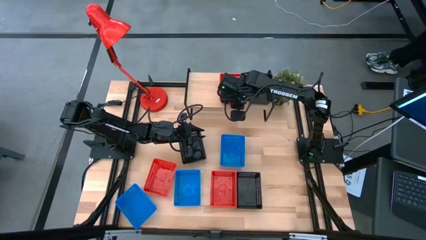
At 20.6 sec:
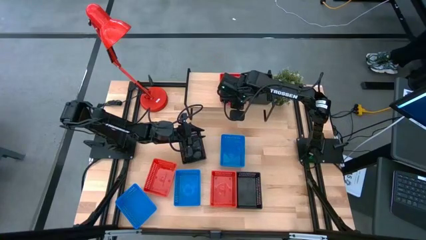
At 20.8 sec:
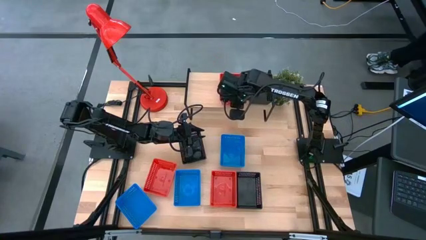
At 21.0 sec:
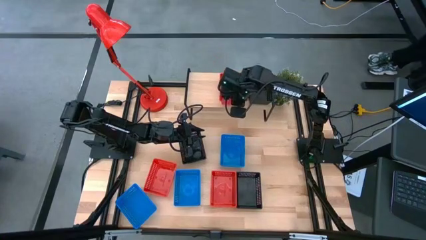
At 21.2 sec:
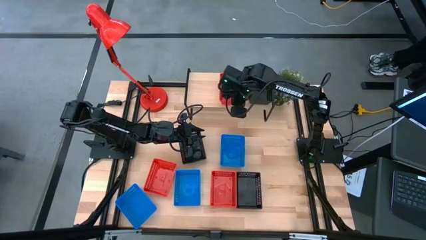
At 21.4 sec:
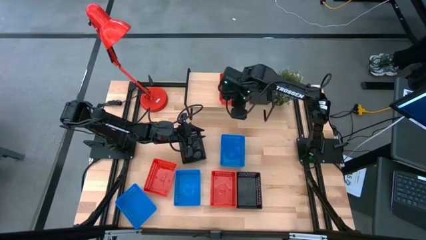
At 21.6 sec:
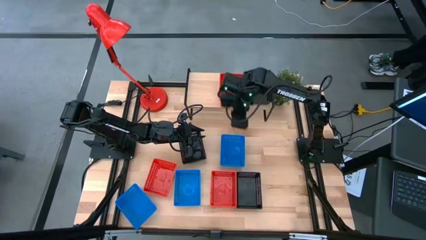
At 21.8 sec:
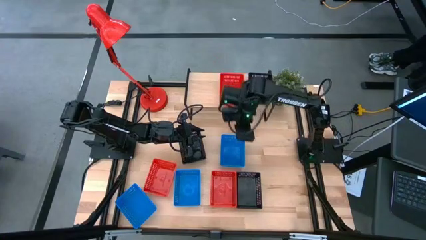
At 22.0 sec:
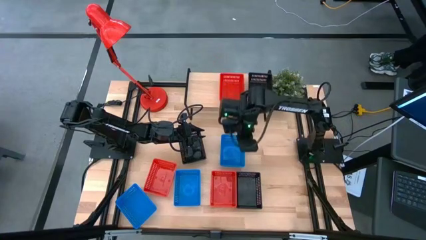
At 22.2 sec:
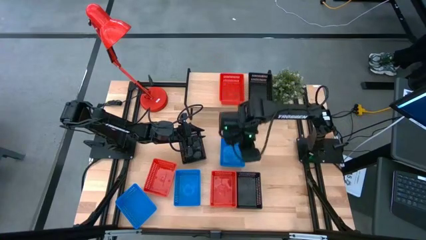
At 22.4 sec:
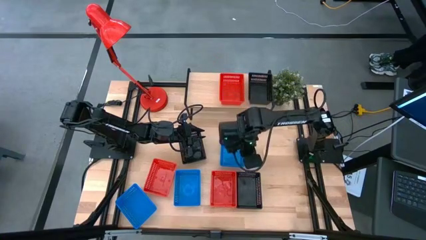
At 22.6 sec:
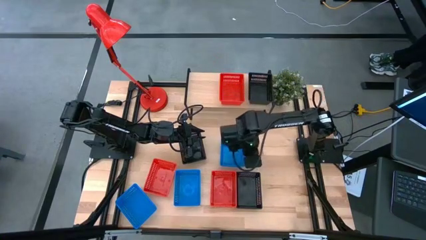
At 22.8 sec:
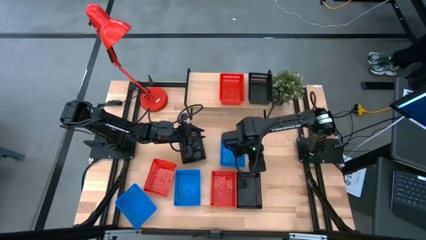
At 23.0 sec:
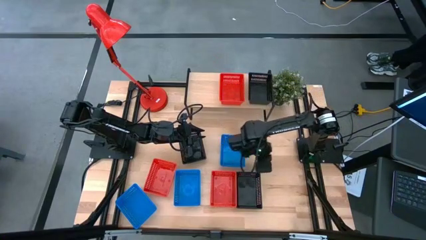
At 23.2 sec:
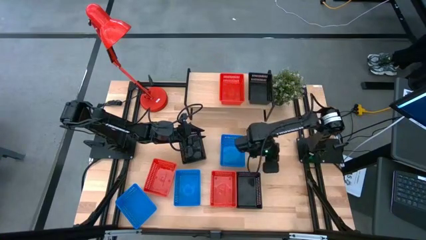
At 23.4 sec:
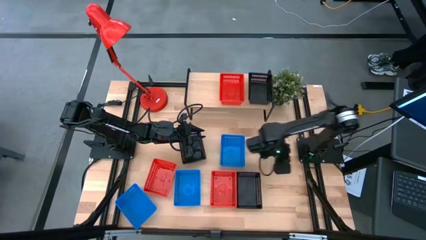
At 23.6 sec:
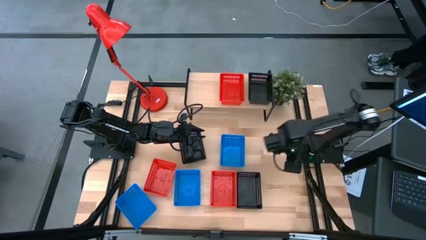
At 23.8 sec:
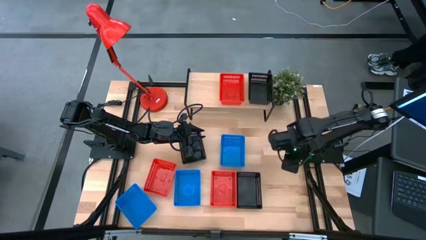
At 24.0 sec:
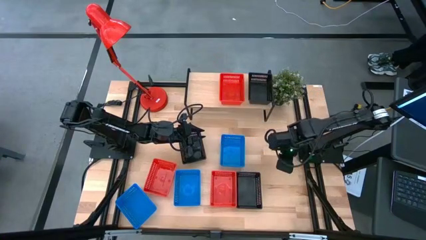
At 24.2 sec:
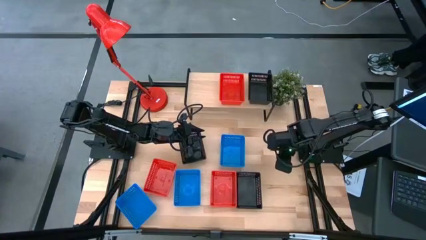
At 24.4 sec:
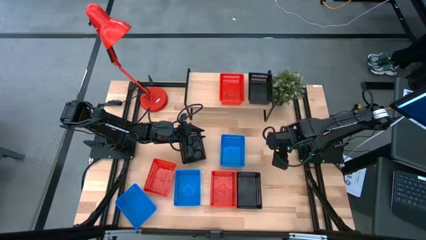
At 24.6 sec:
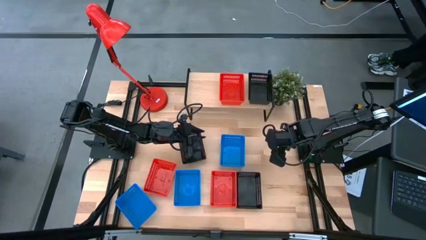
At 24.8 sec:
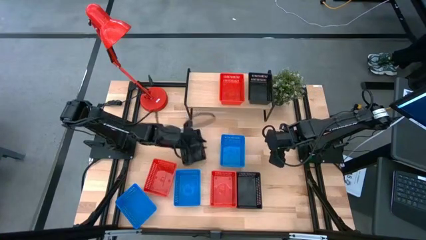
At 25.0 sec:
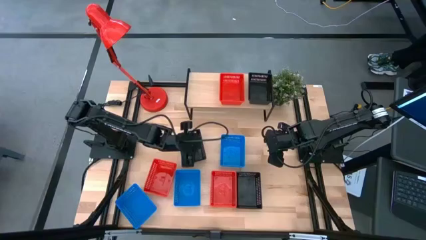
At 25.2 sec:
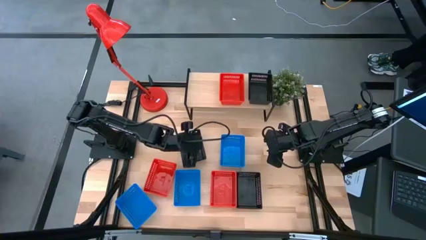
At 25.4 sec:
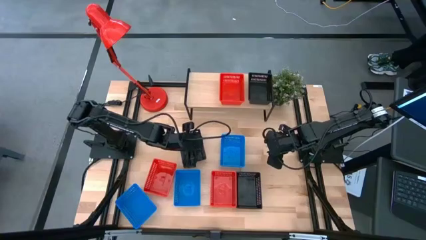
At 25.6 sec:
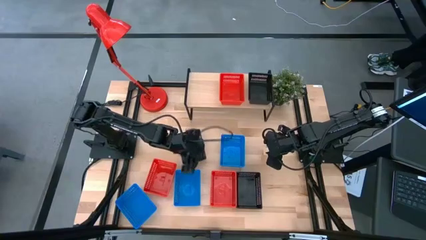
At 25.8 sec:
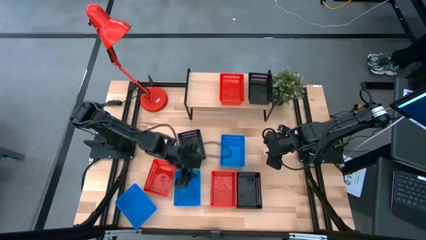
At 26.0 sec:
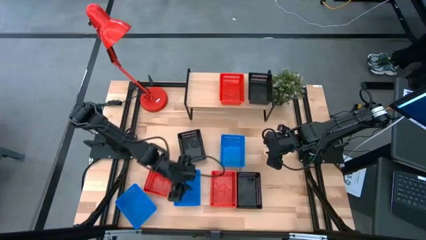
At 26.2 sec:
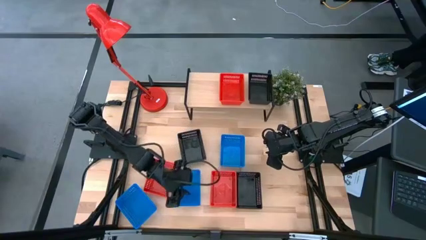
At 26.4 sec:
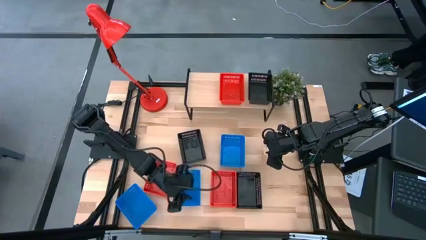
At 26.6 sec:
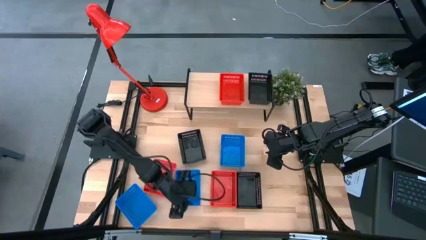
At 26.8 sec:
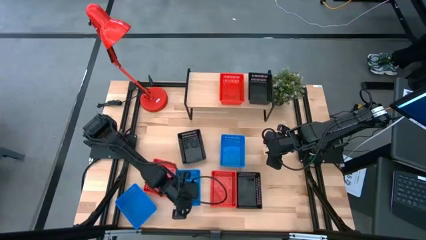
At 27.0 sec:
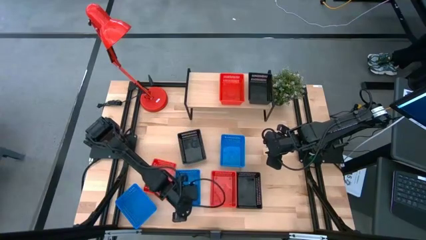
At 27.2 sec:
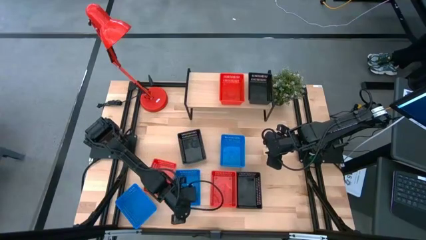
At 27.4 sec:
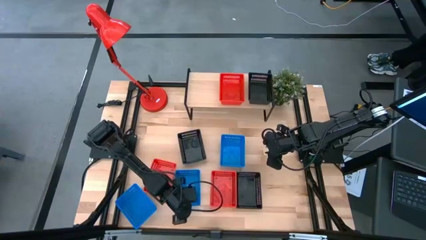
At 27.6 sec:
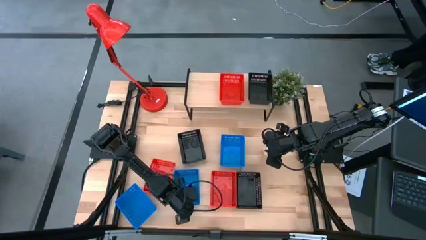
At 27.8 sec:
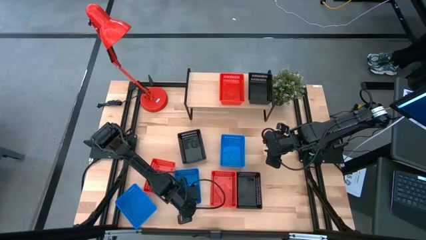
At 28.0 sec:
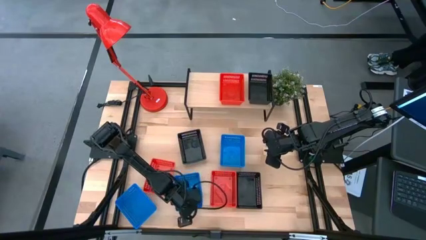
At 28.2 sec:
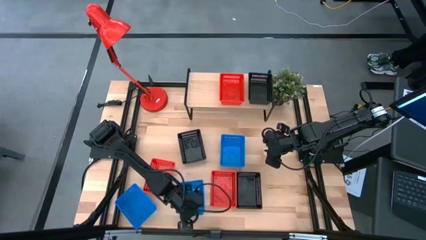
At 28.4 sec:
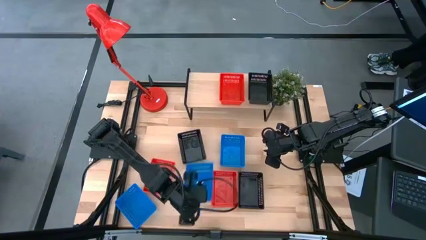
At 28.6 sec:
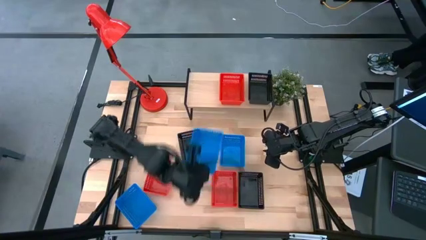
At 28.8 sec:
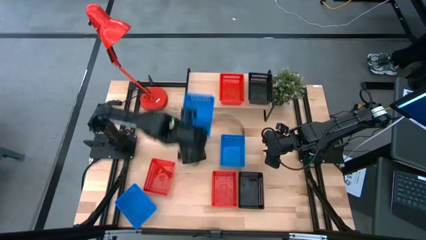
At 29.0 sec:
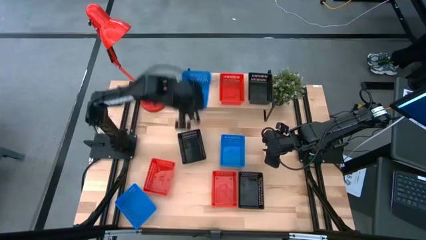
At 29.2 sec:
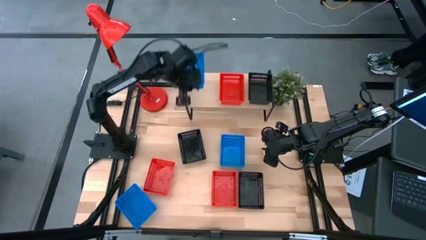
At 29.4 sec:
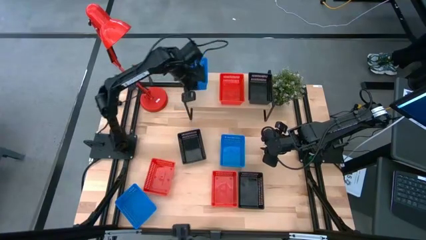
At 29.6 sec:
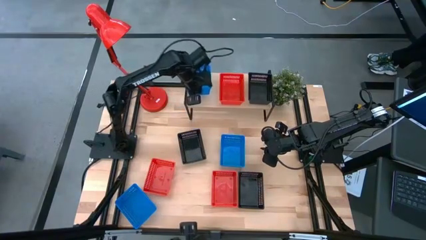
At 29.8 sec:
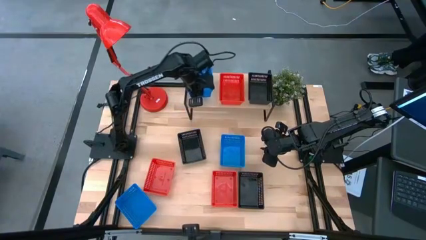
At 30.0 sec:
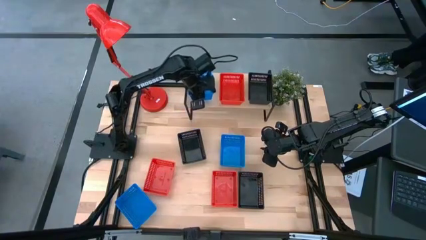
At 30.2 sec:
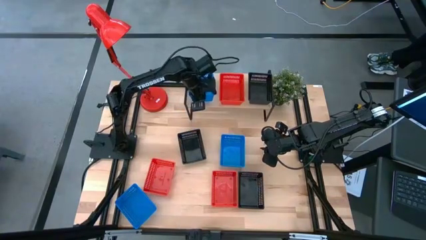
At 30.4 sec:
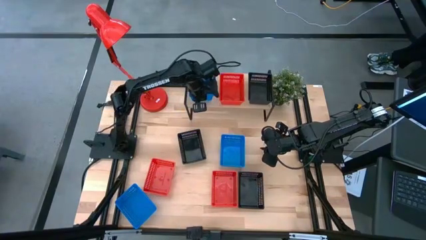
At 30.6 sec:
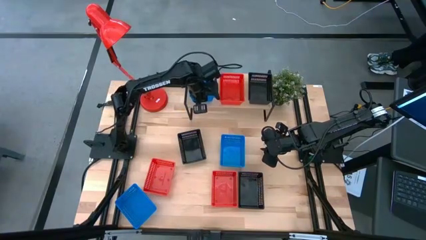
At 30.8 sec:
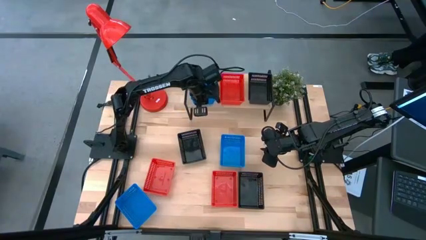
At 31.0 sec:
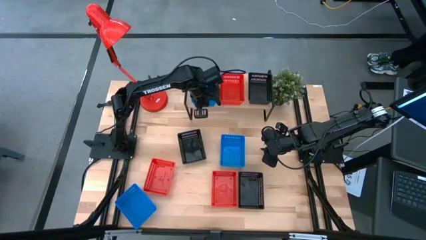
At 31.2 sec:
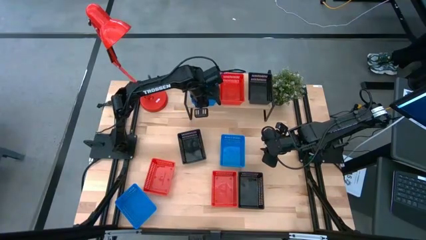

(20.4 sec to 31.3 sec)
Task: Stack baskets on shelf by color
Put the center blue bin on the shelf
